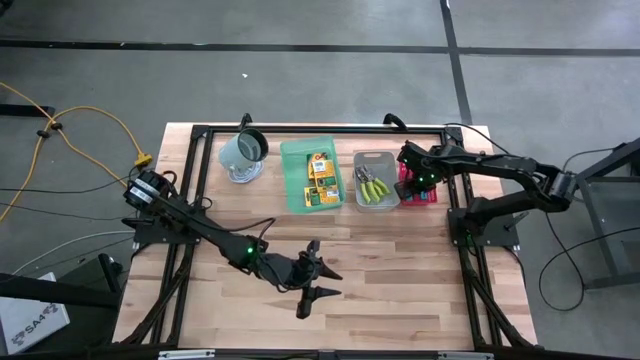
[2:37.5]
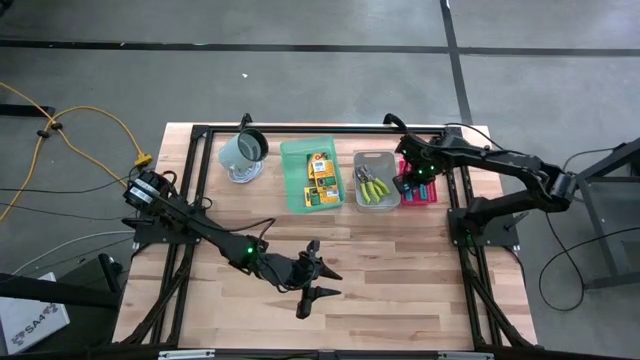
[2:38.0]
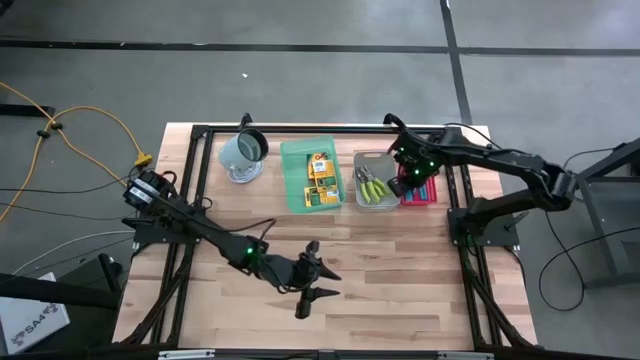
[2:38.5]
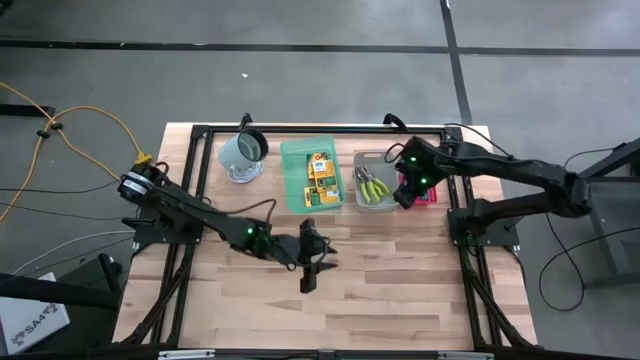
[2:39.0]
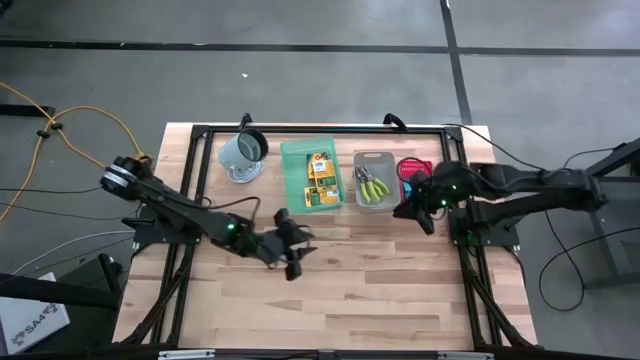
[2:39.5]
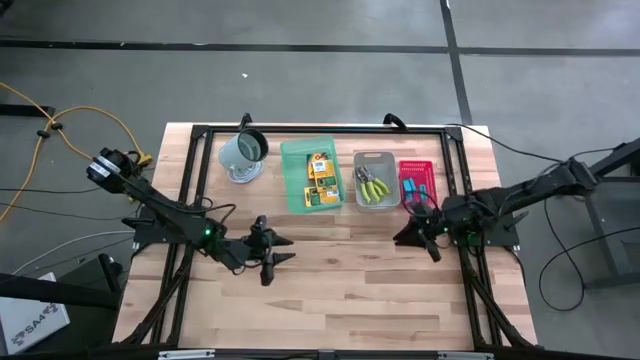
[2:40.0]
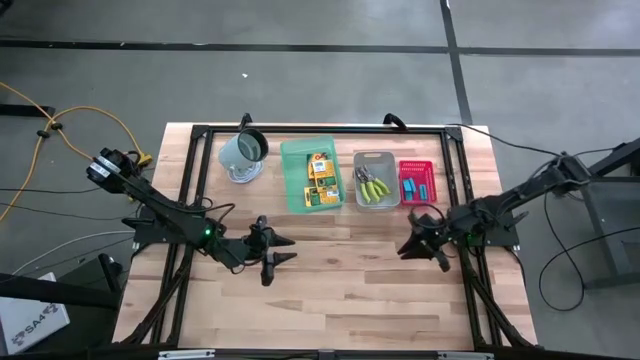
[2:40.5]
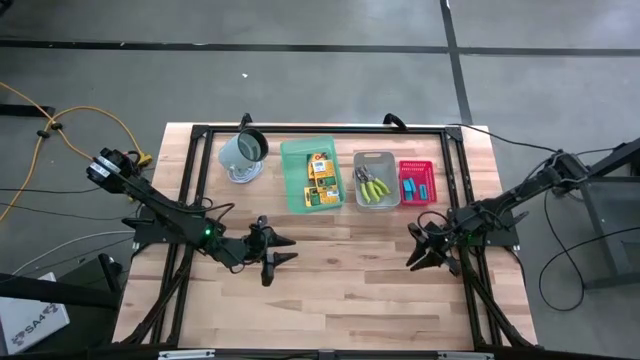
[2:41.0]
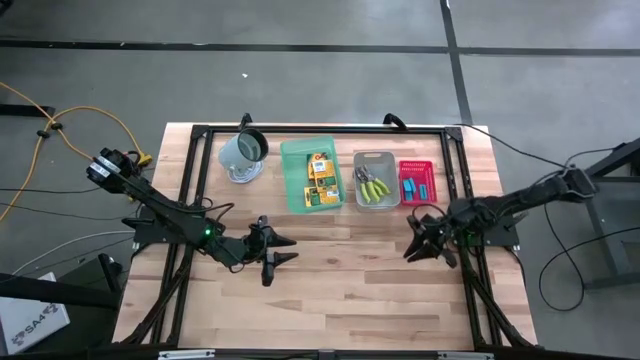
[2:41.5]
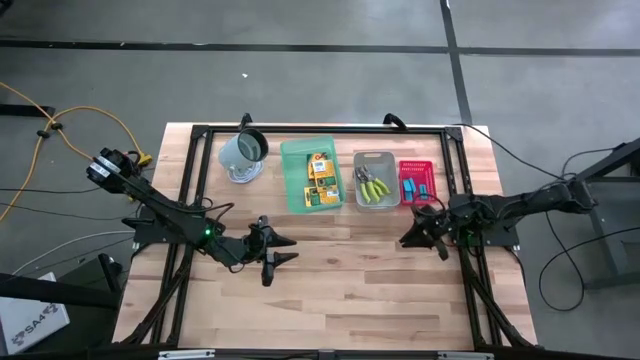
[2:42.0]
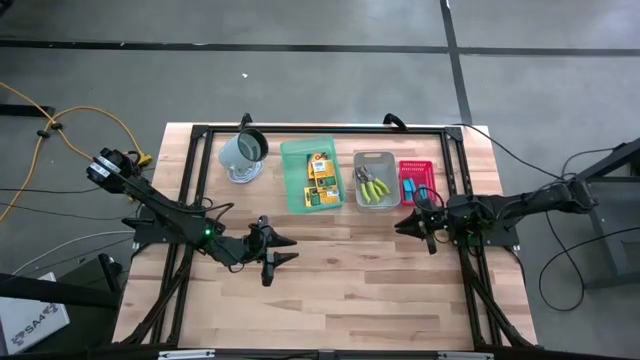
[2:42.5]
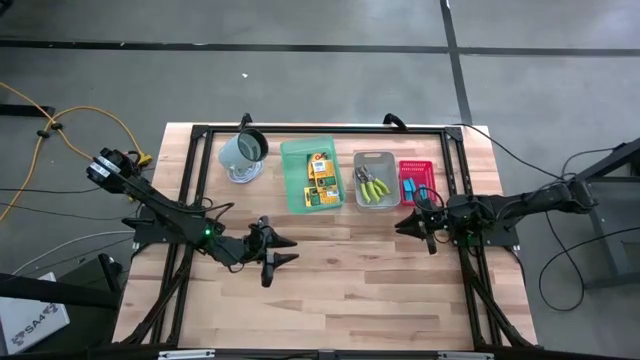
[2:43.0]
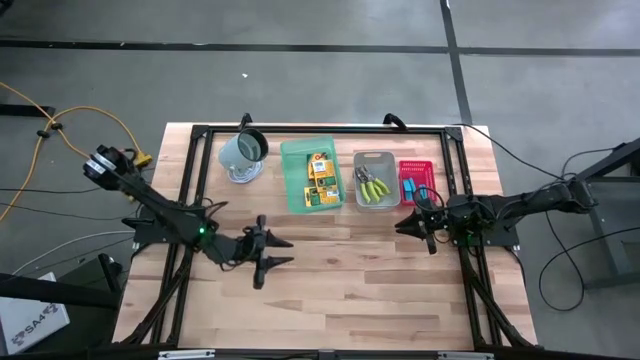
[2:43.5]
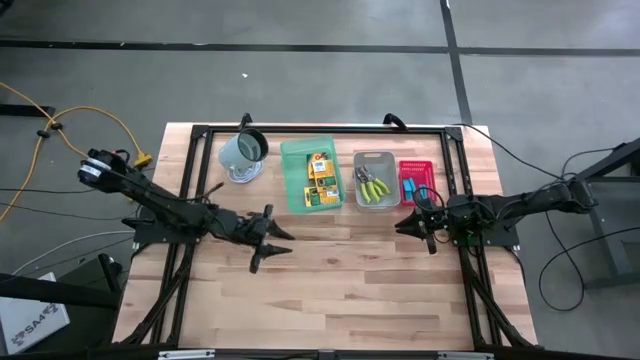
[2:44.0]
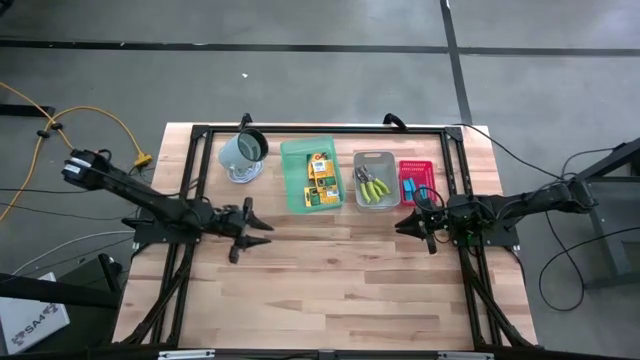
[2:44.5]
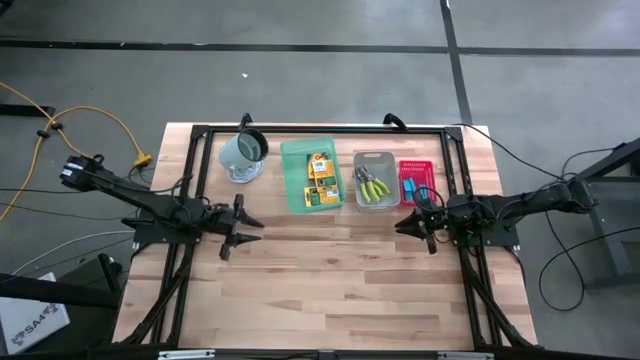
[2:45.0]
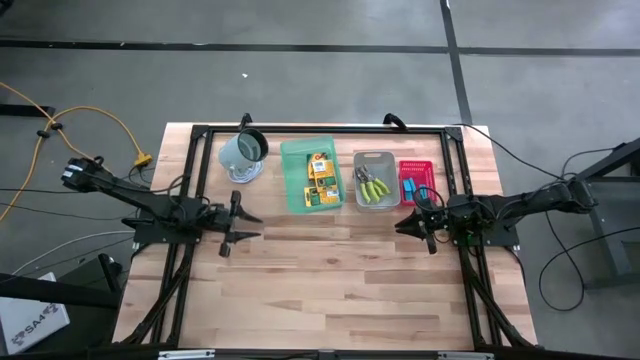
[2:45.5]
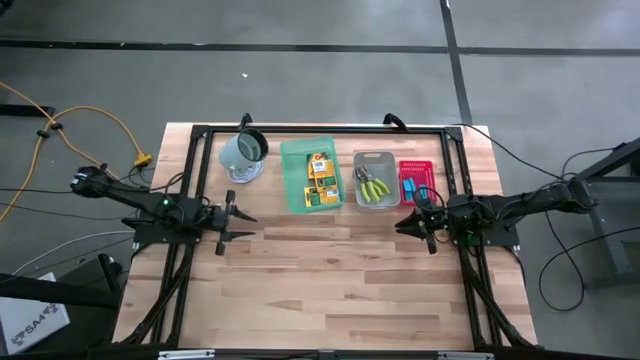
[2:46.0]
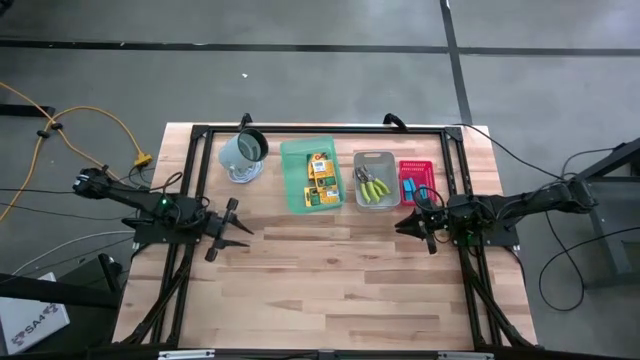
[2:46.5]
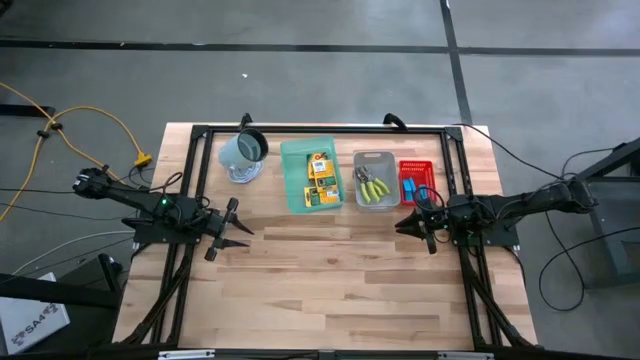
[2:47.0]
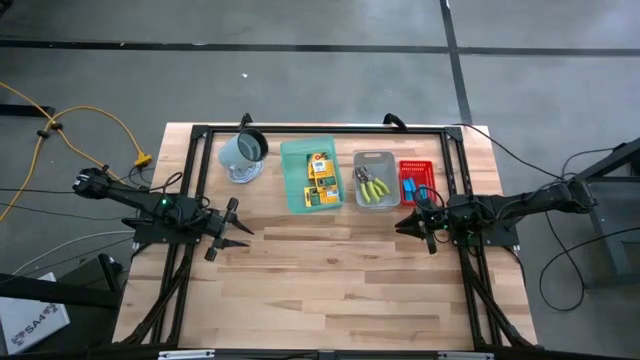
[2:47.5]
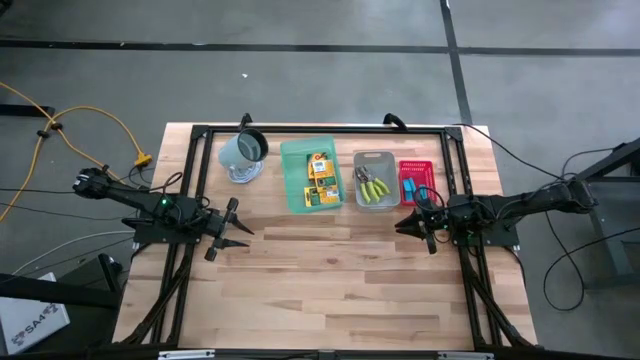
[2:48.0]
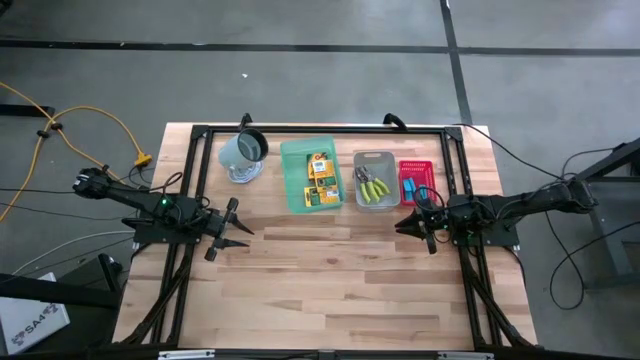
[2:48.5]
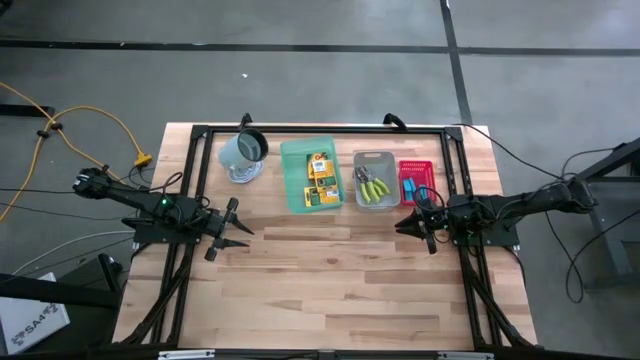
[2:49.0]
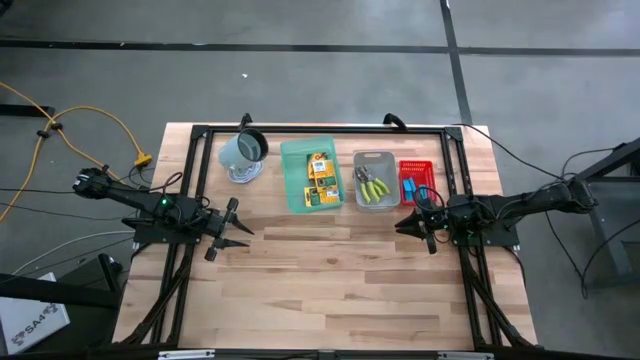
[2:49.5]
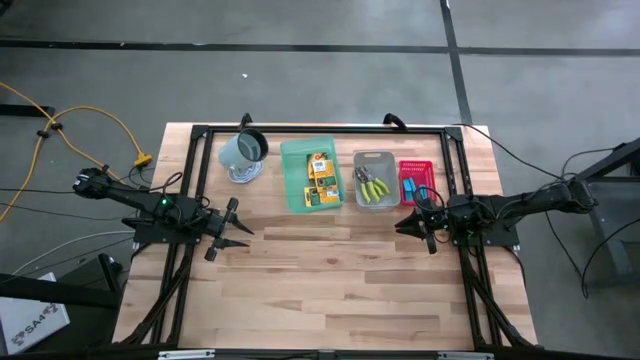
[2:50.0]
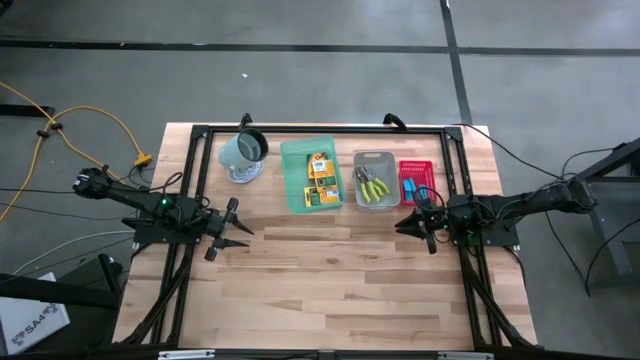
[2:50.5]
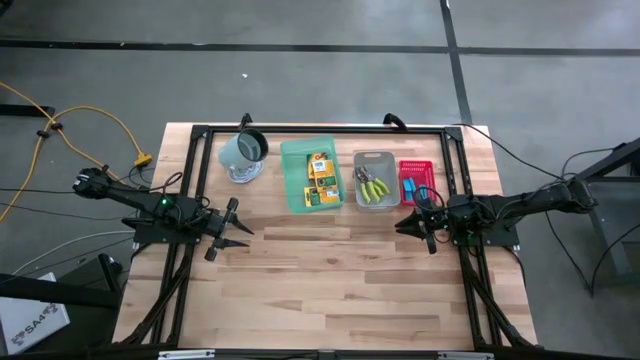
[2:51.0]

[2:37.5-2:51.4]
Task: Pick & Place School Supplies
Return to Home Position

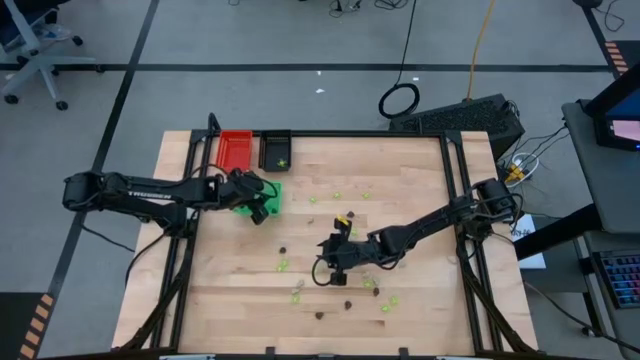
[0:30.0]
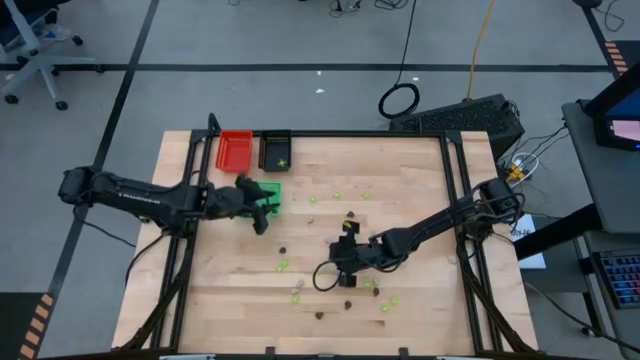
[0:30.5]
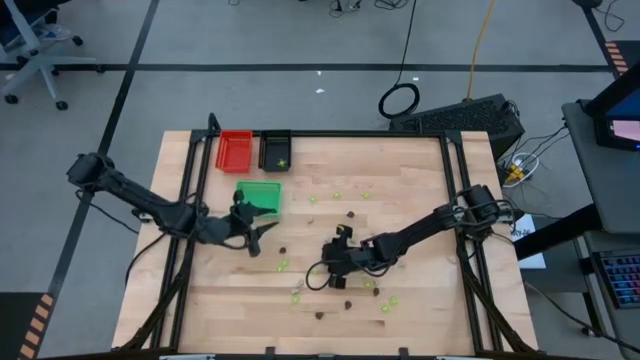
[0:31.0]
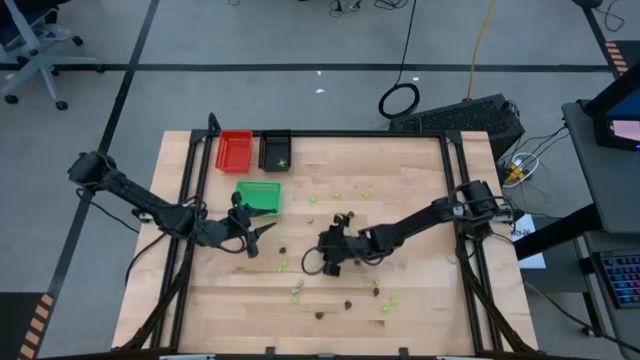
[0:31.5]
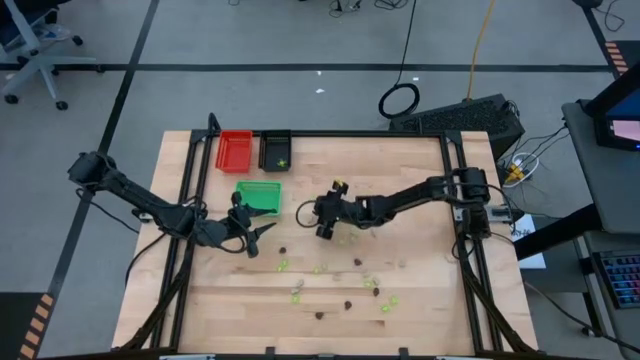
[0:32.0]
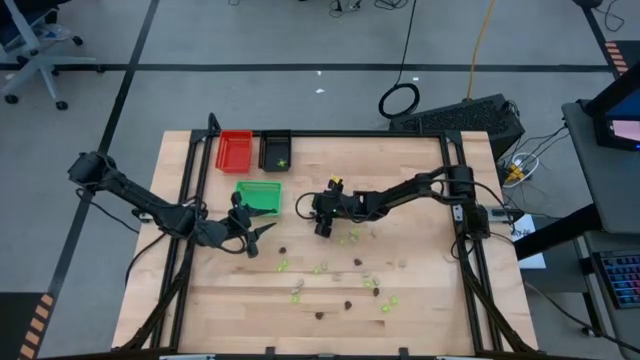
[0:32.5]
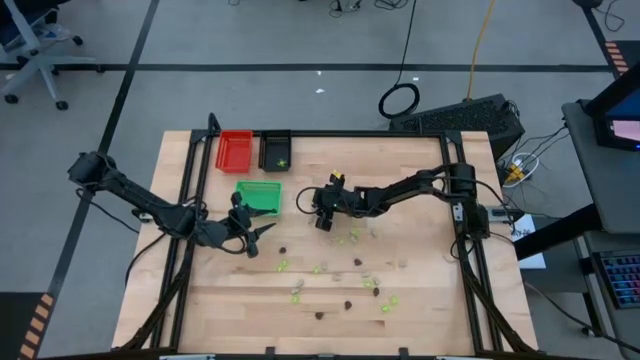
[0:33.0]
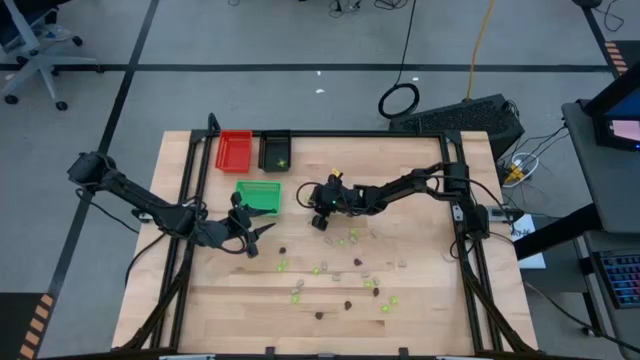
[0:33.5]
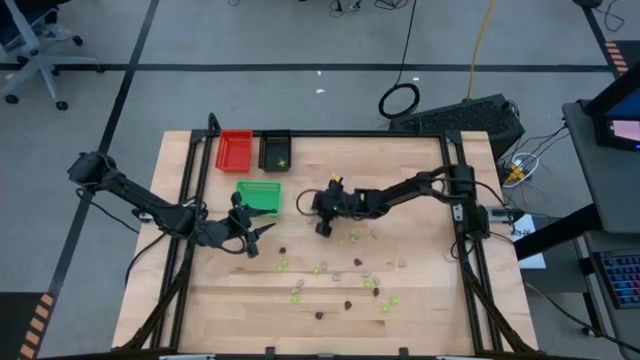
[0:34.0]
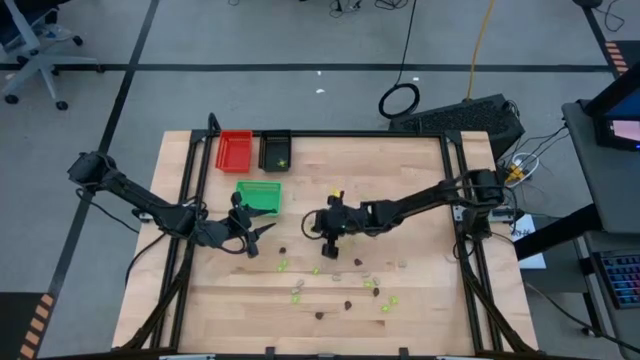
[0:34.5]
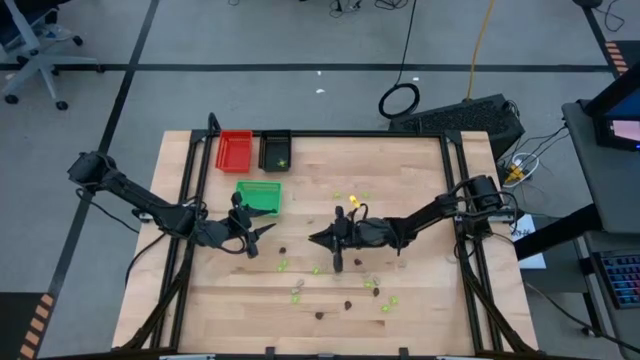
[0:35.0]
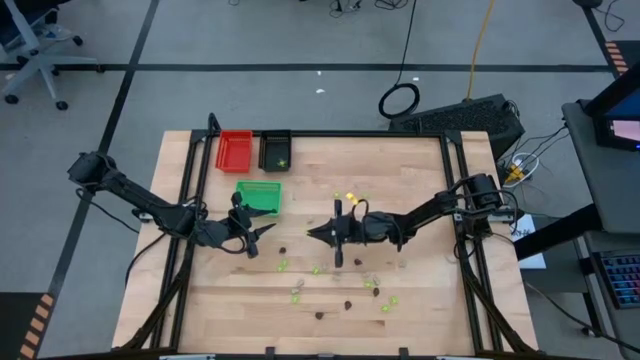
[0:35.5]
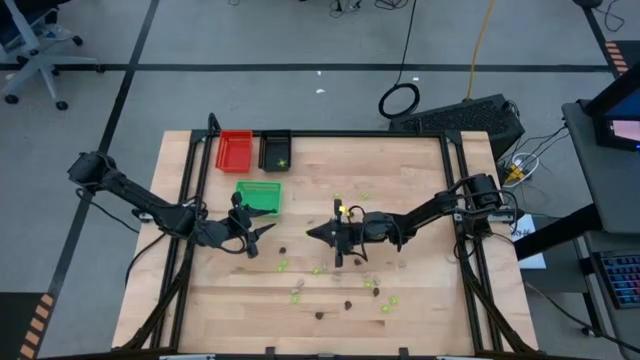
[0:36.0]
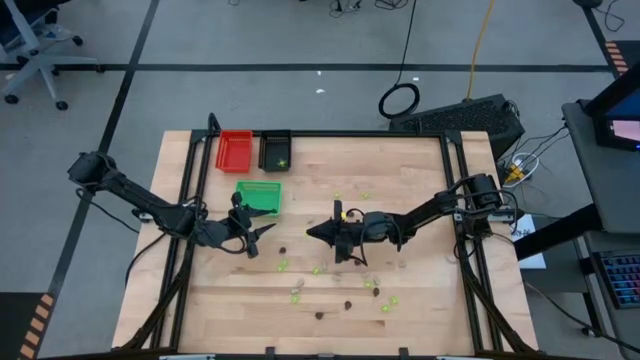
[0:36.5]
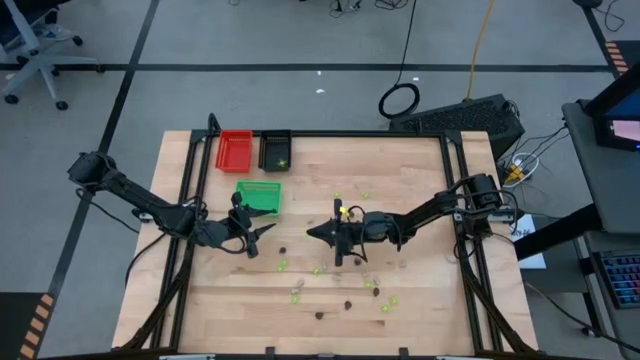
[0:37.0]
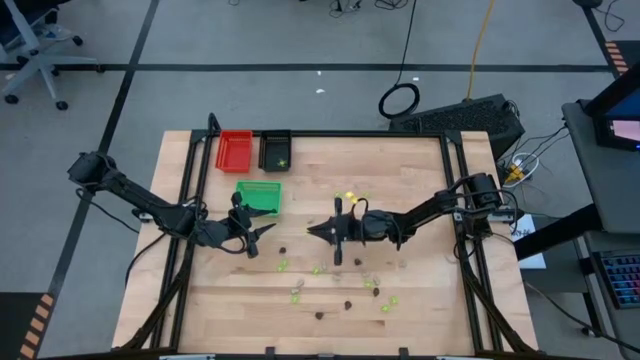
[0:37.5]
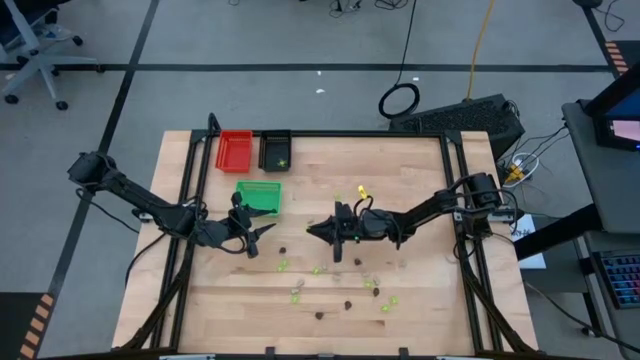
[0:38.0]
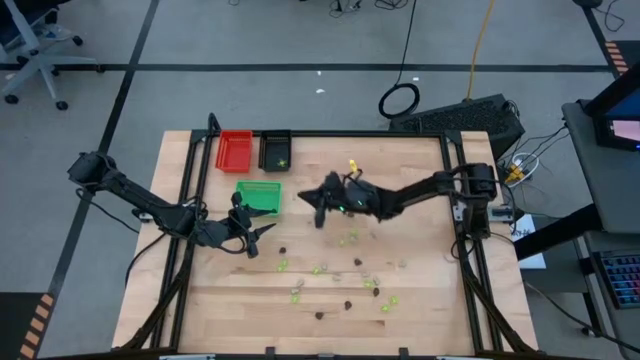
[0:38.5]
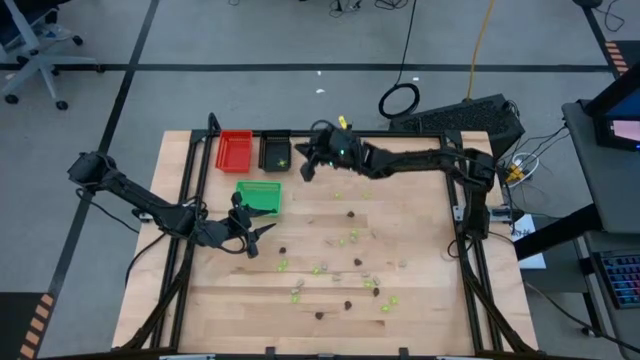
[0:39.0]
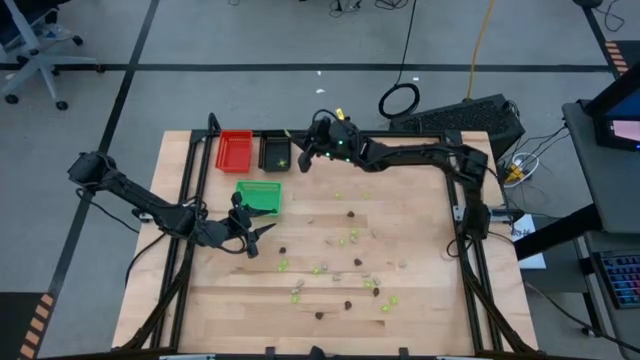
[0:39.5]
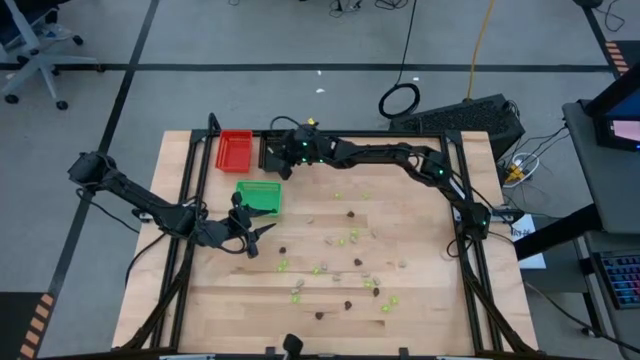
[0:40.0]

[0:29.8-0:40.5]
Task: Sort Halloween decoration
Put the green spider toy into the black bin
